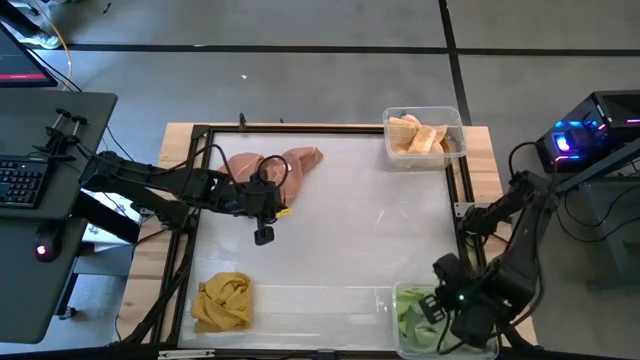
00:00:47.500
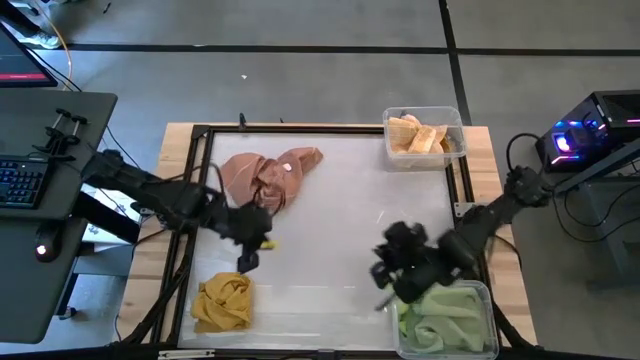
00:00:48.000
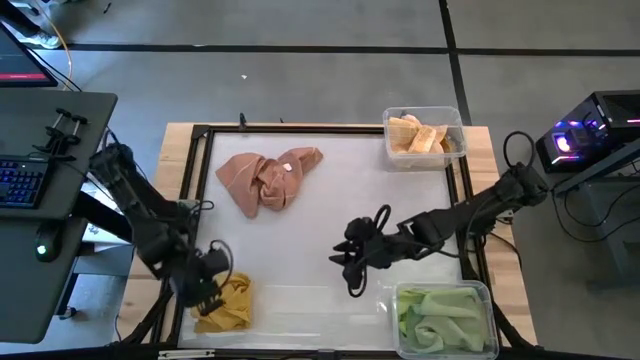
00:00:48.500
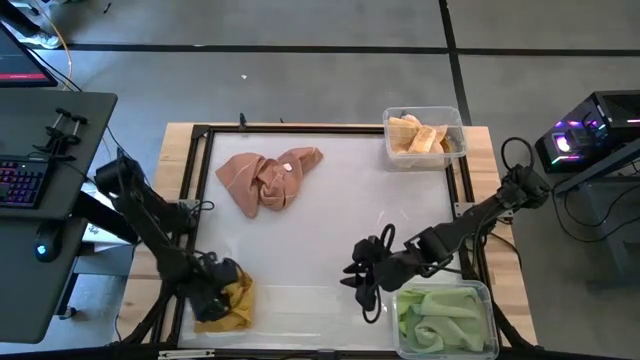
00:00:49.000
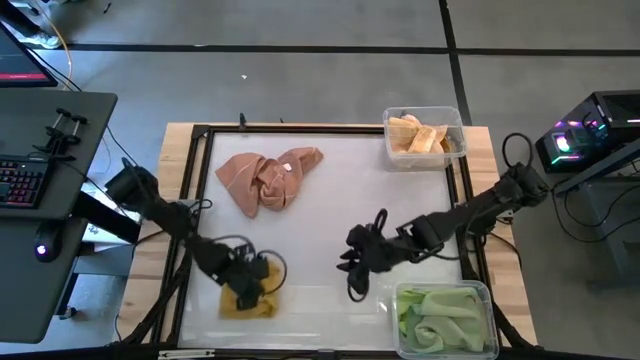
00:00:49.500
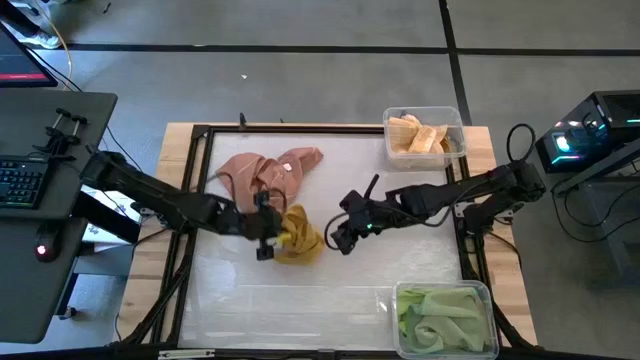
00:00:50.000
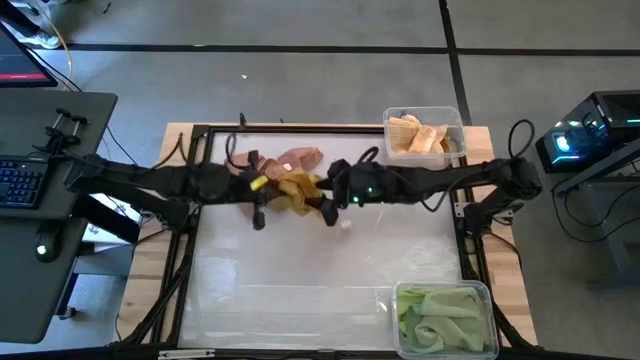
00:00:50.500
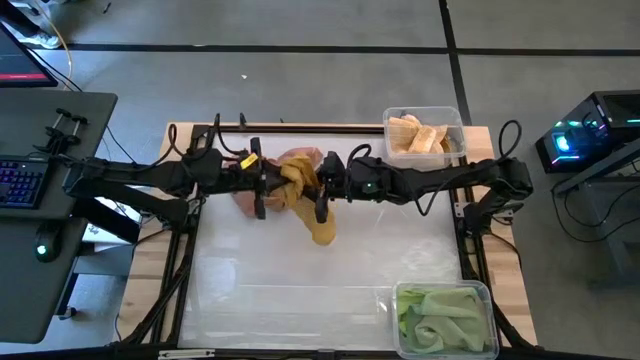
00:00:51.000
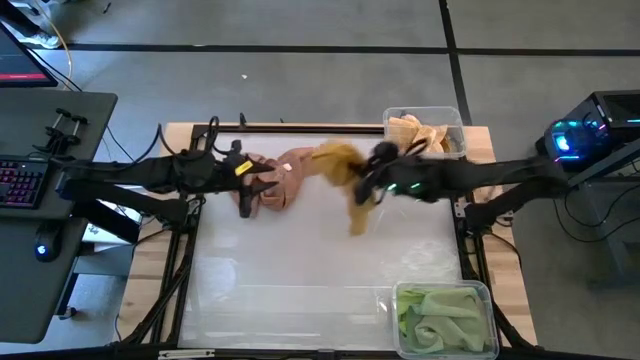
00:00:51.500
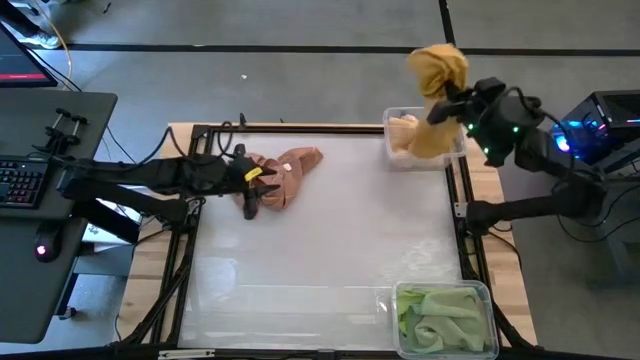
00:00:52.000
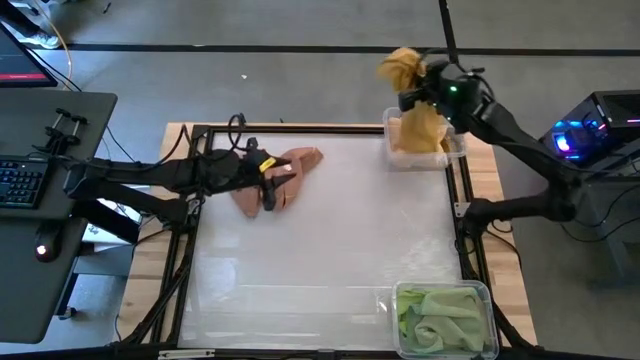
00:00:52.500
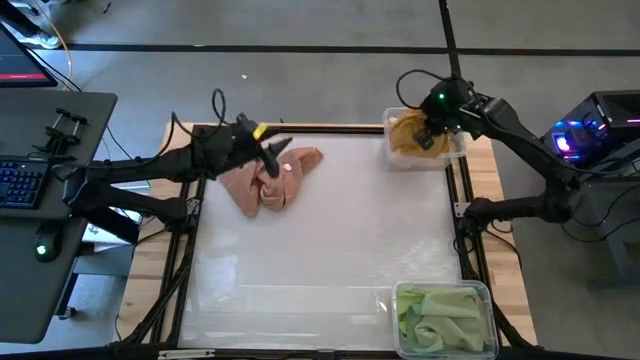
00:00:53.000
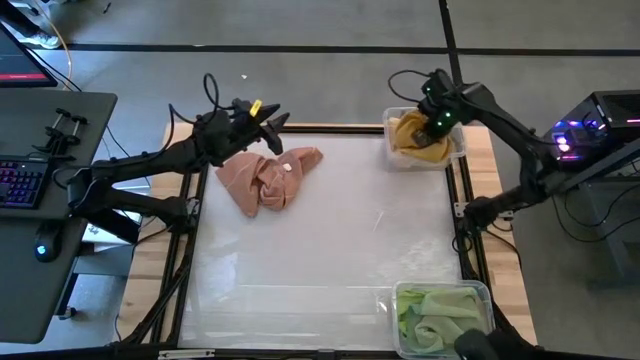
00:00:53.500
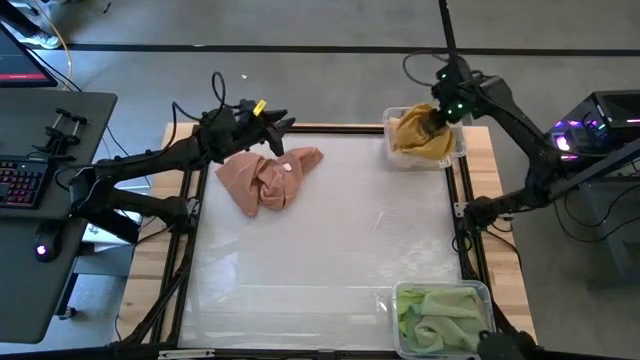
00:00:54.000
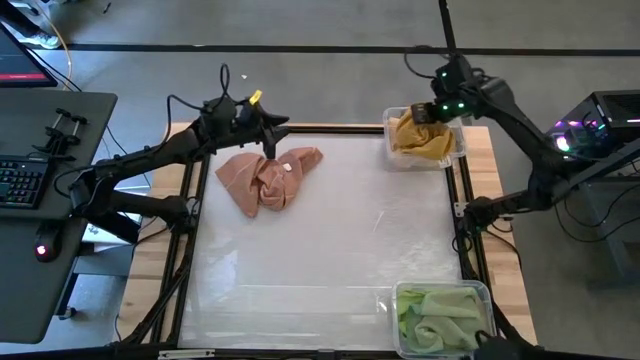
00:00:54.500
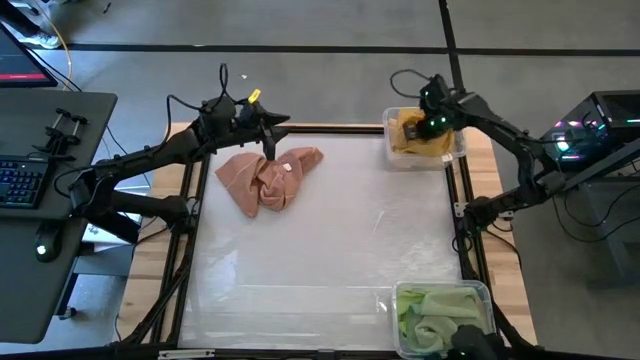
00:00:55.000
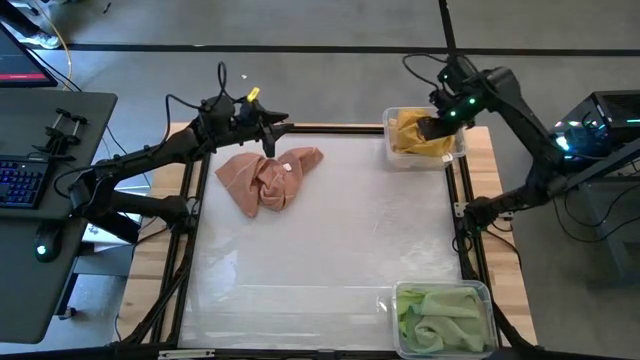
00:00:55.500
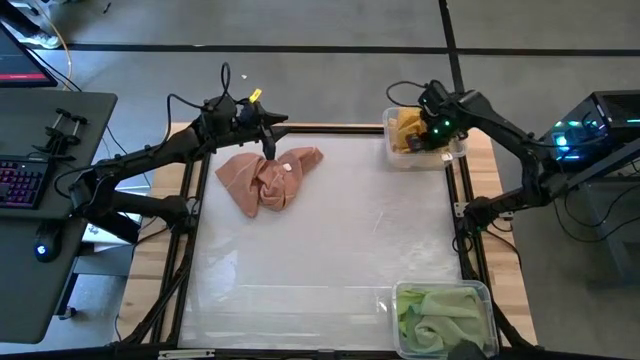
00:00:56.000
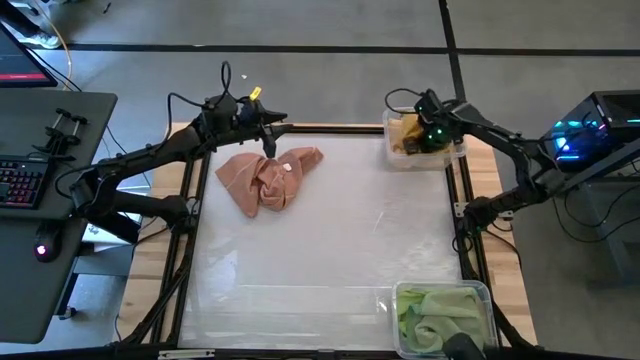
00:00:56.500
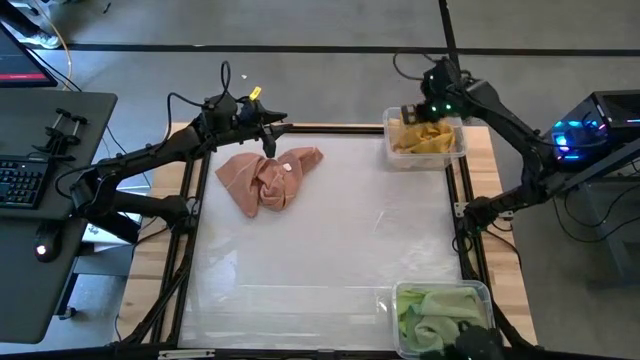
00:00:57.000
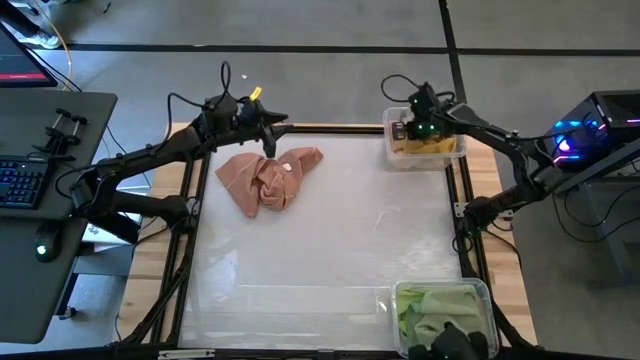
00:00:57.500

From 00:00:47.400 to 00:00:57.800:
Task: Sort towels by color in basket
Put the yellow towel into the top transparent bin

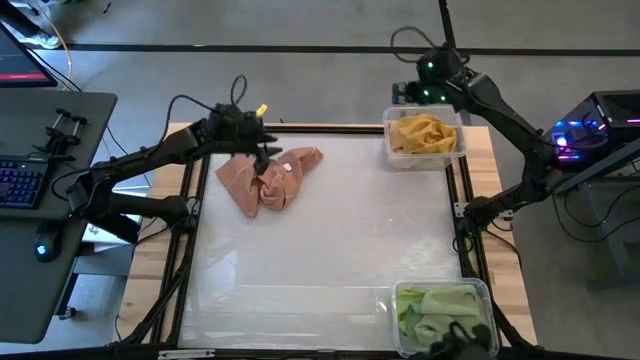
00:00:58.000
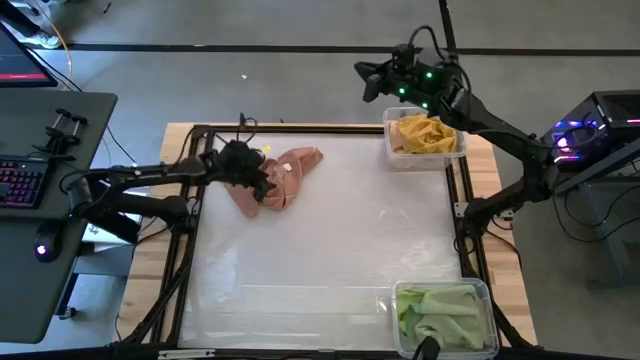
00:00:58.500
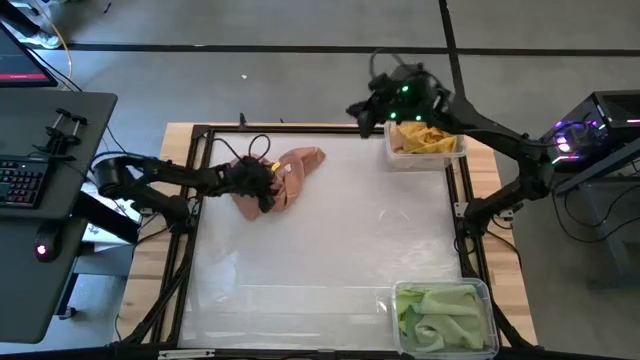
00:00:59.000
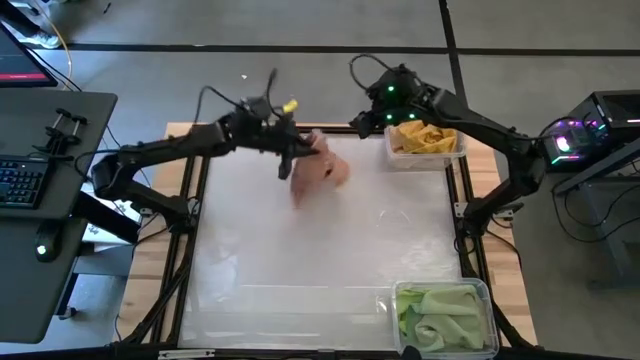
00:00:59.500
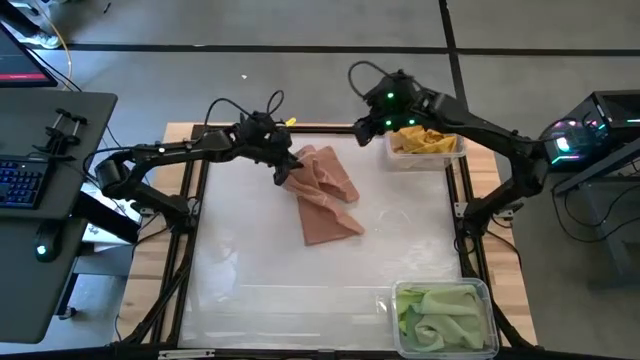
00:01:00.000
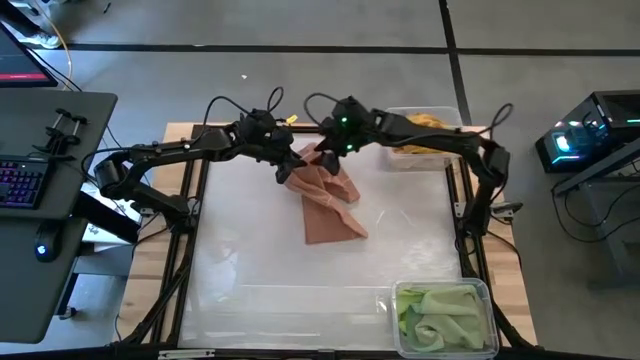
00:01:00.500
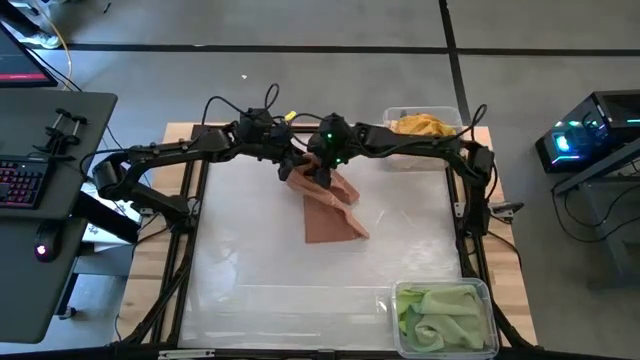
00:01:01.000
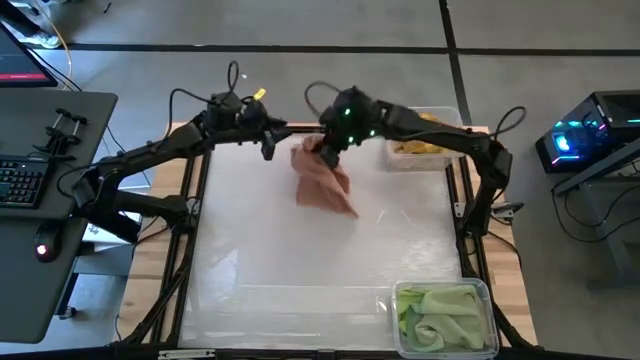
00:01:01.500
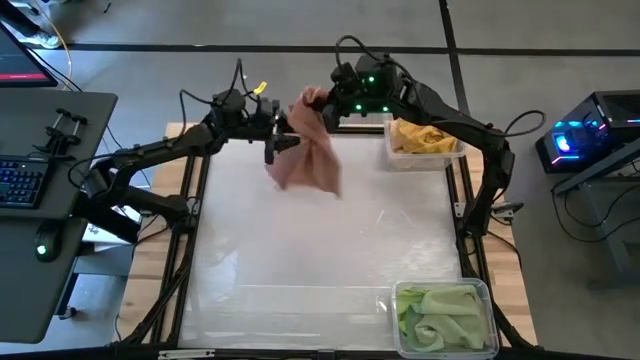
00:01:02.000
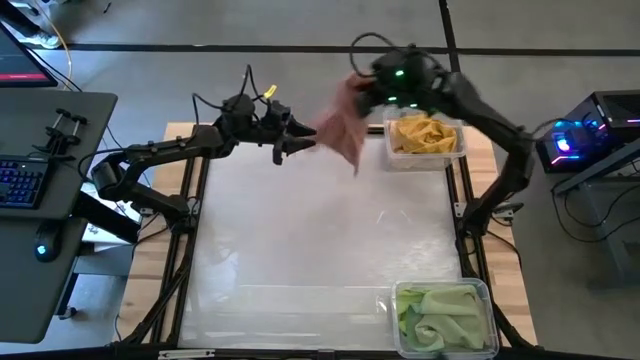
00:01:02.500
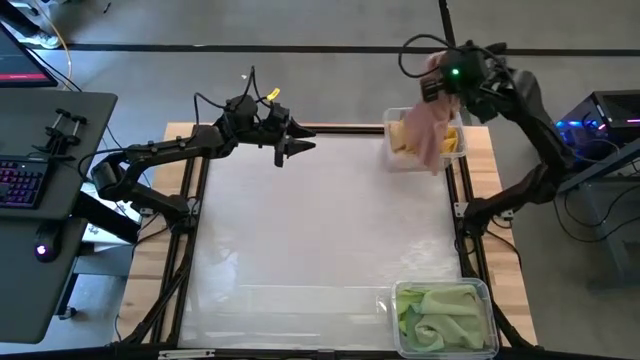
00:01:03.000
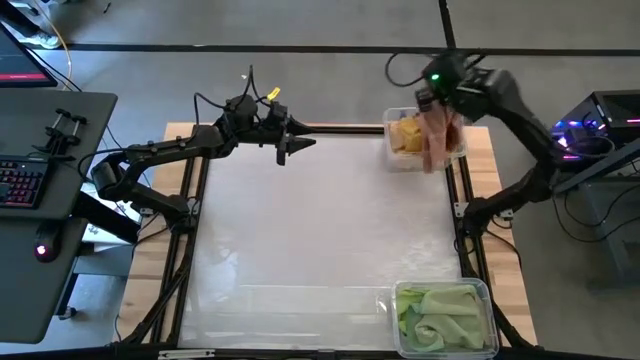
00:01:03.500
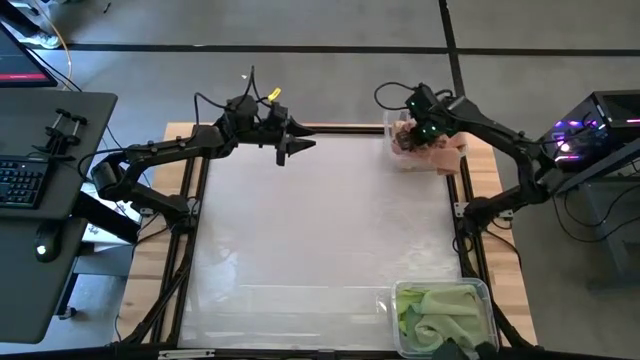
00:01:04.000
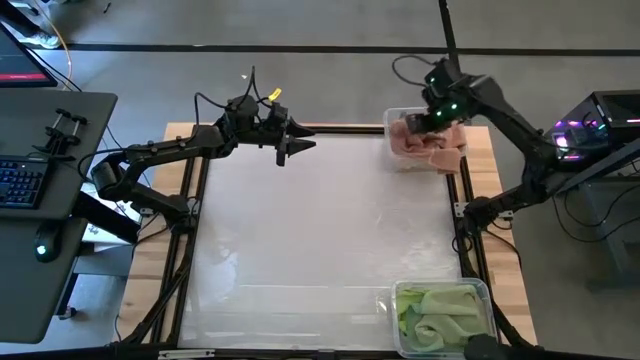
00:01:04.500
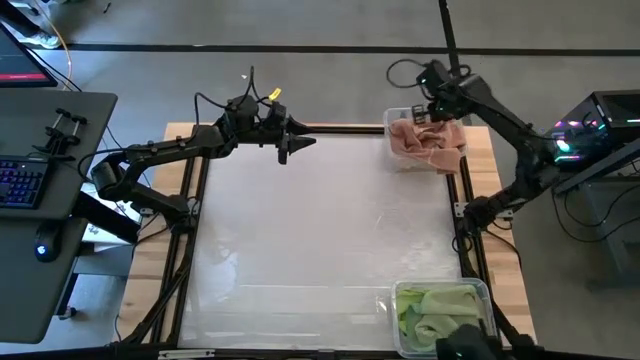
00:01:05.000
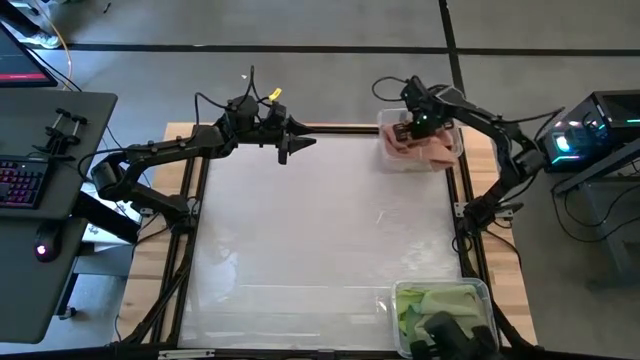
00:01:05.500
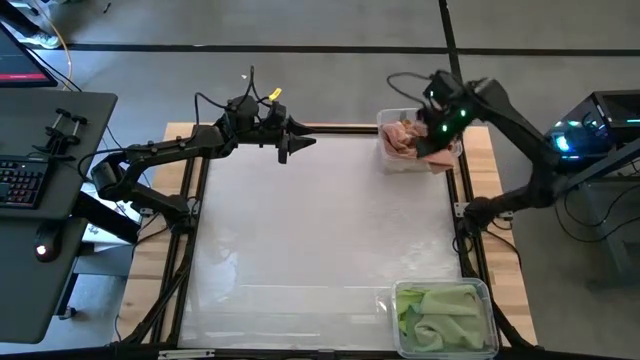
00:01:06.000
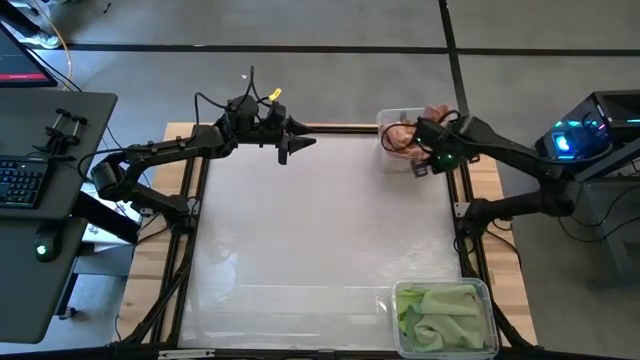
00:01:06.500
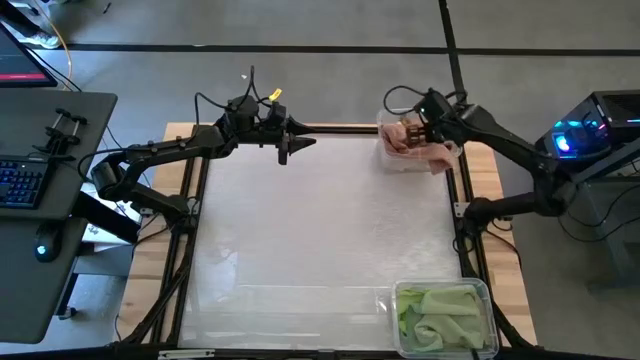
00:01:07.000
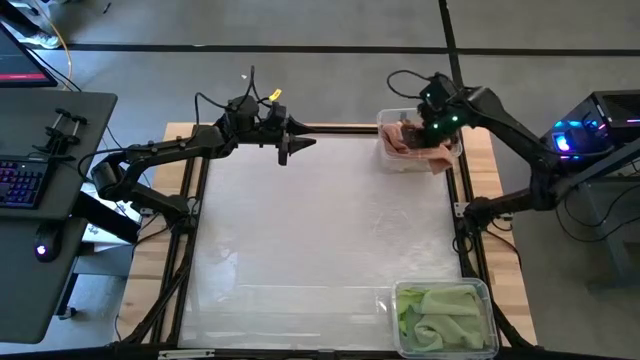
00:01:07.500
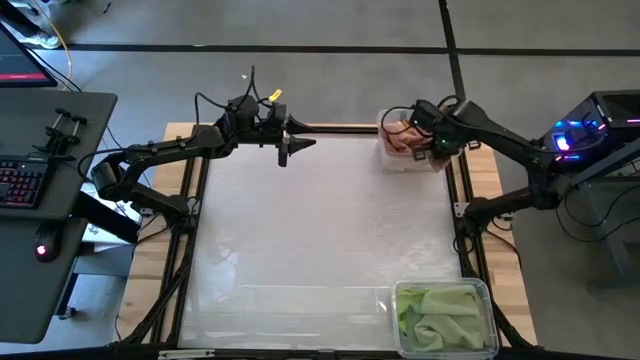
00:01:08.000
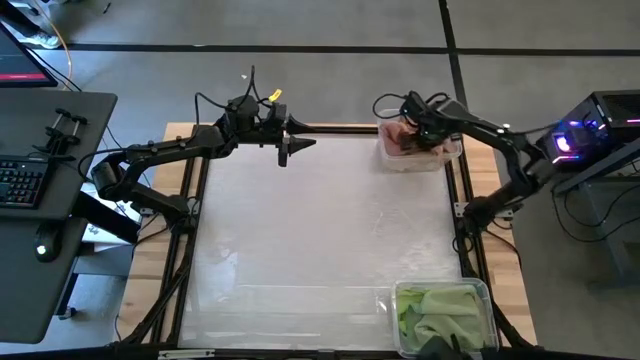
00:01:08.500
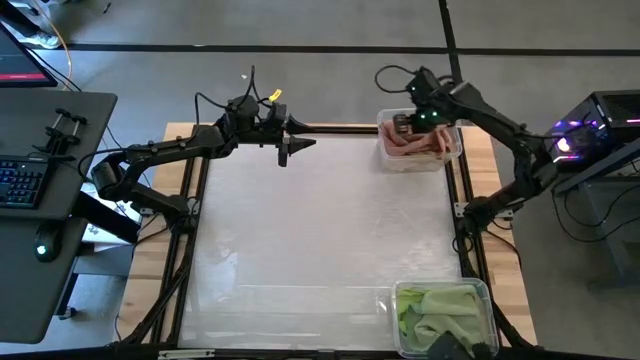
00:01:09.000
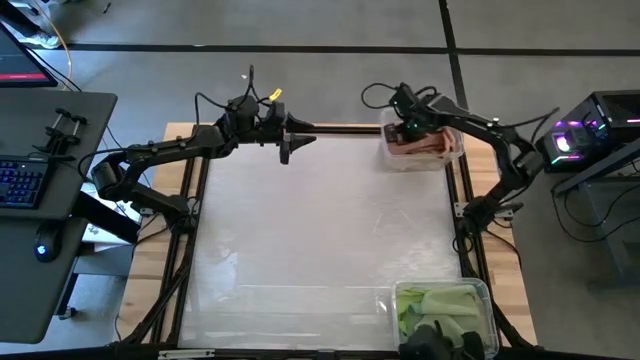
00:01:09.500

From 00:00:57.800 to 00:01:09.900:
Put the brown towel into the top transparent bin
